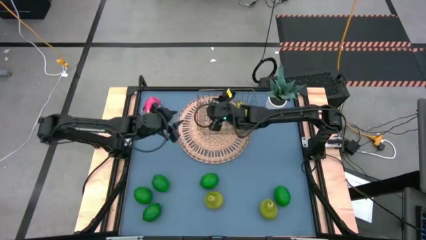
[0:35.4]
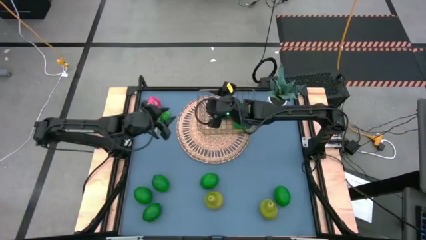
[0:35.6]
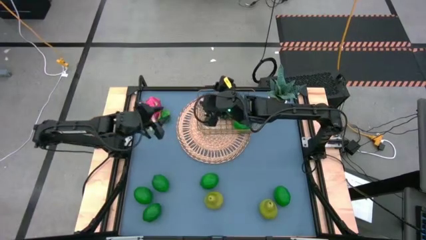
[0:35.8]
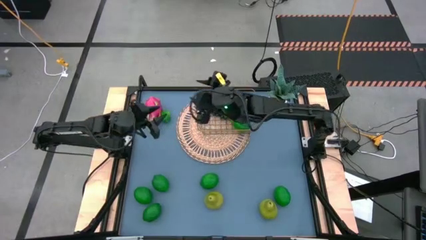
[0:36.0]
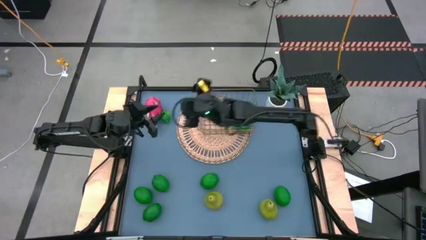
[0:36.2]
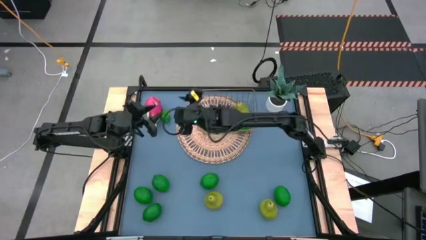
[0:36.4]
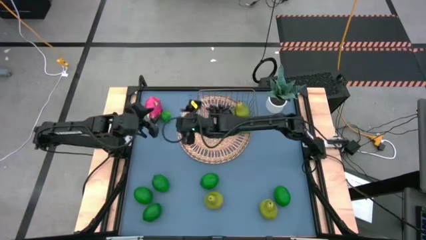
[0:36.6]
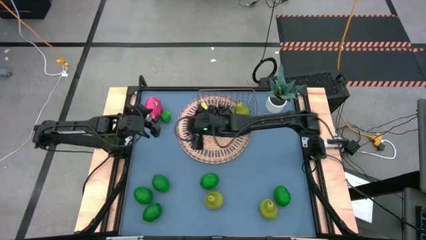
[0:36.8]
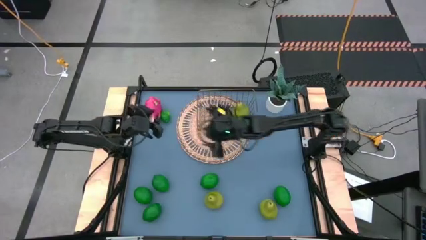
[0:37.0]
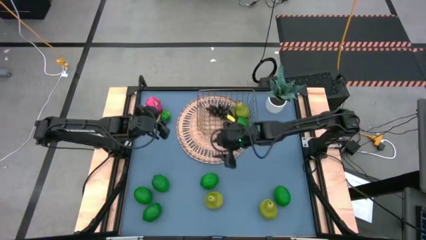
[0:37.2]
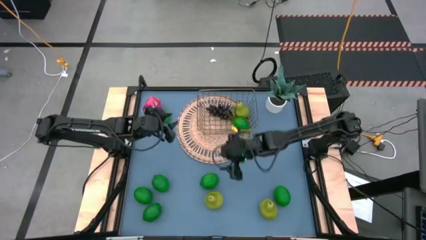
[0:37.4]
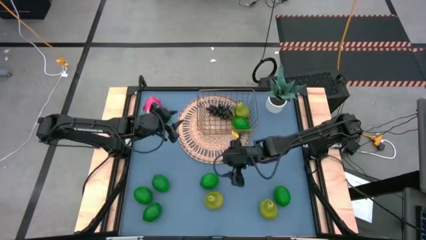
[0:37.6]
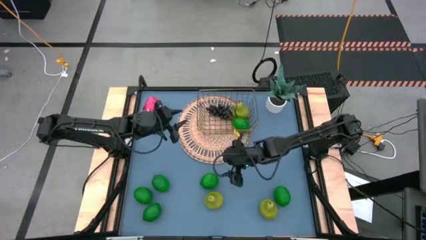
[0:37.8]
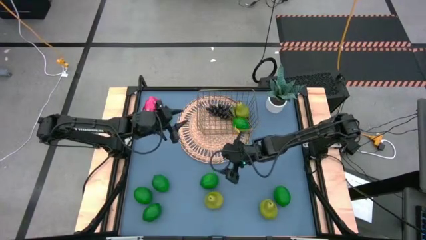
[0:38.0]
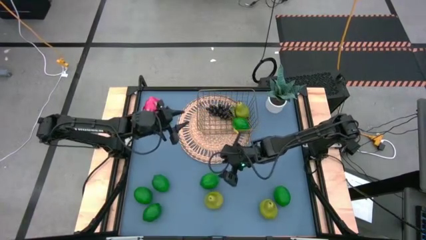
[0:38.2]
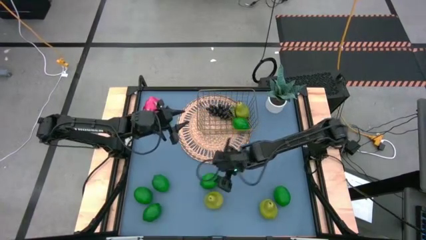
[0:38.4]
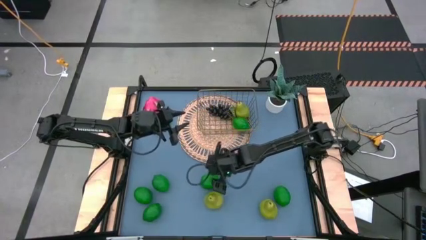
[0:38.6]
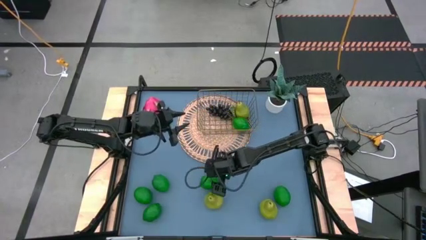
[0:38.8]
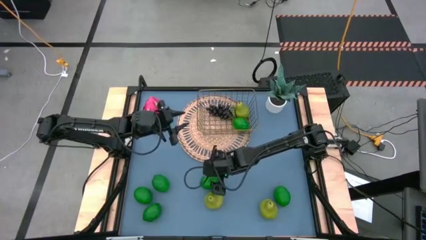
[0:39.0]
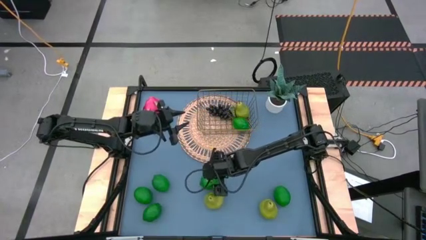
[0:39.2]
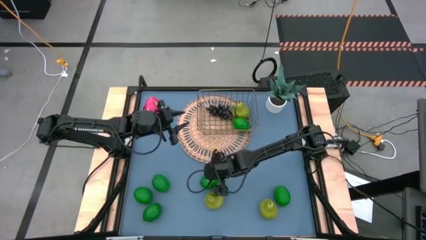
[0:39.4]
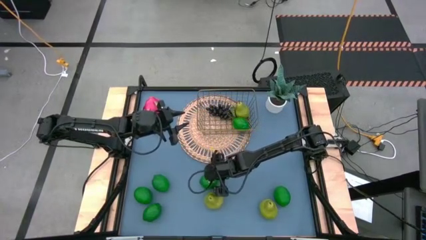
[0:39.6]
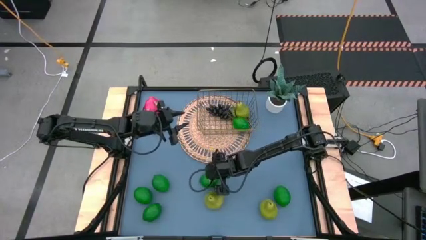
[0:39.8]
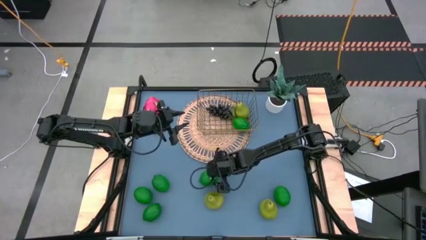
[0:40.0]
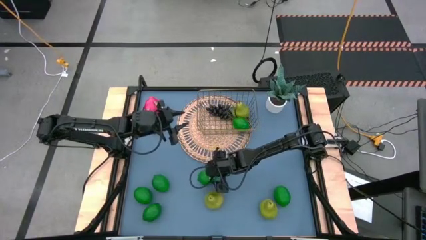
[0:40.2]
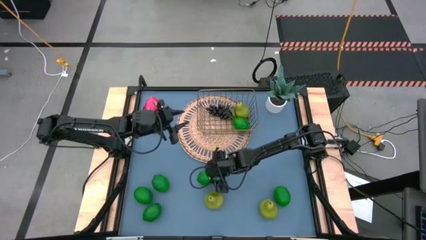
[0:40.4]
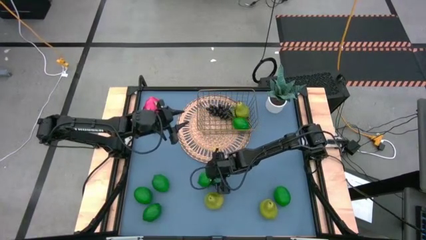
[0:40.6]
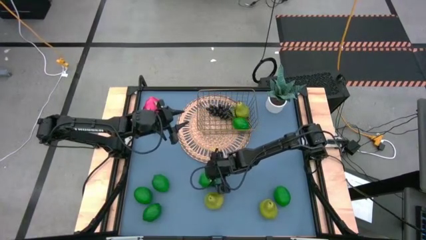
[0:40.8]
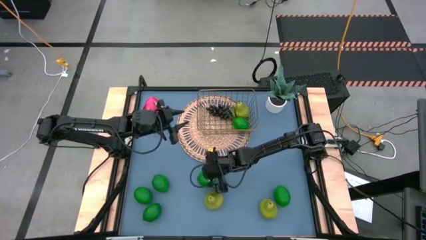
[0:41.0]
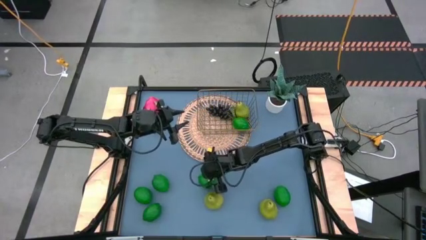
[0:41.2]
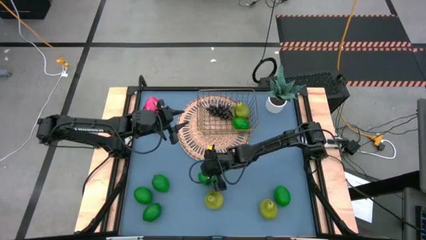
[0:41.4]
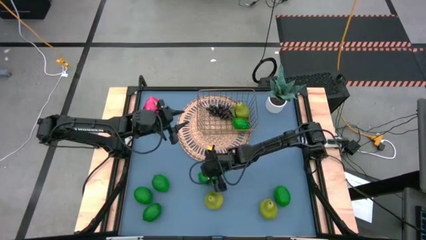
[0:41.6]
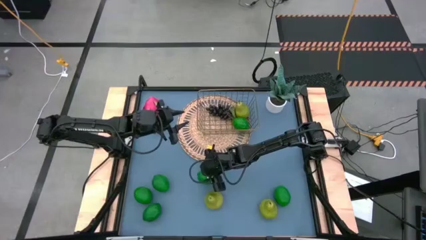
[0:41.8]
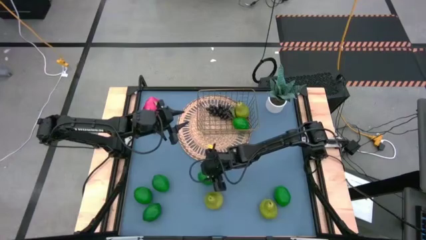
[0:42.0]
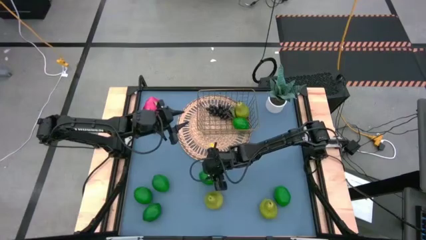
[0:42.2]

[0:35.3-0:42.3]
Task: Build produce basket
Put the green lime into the wire basket

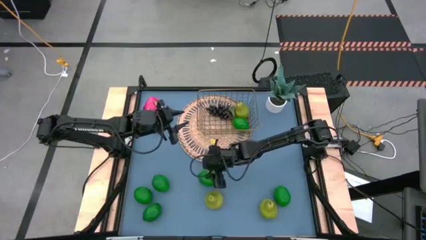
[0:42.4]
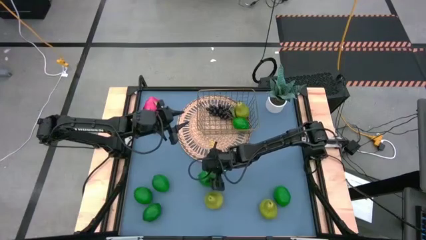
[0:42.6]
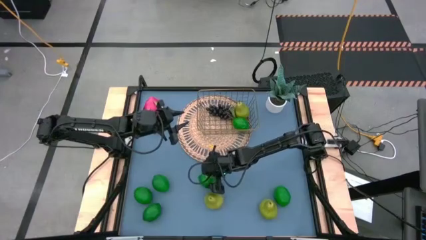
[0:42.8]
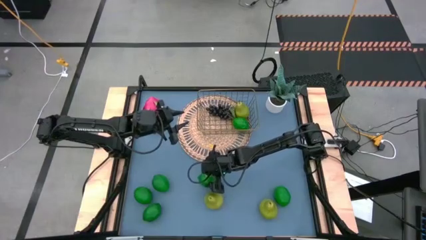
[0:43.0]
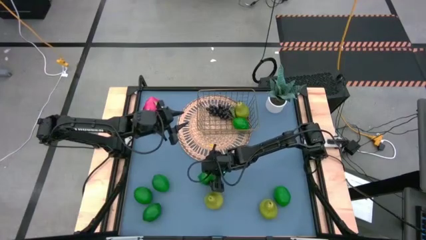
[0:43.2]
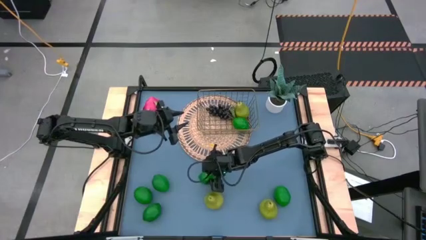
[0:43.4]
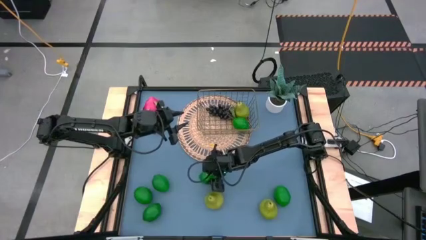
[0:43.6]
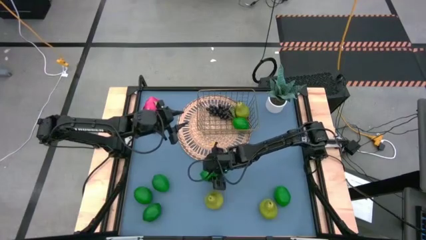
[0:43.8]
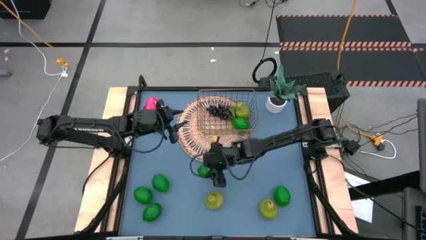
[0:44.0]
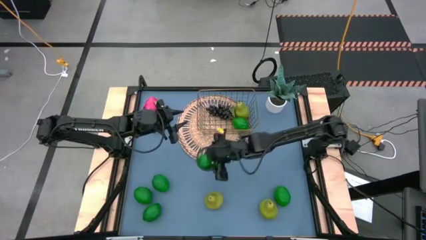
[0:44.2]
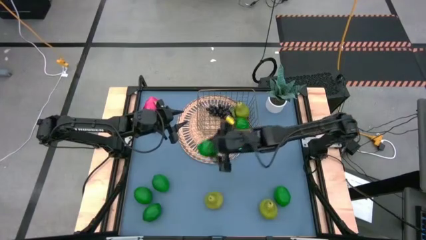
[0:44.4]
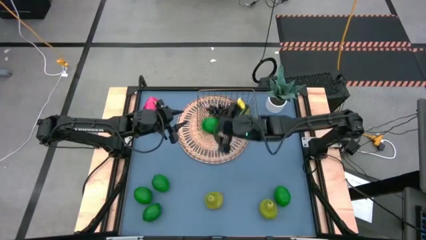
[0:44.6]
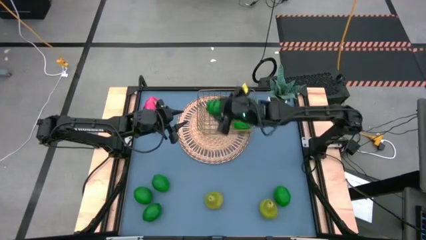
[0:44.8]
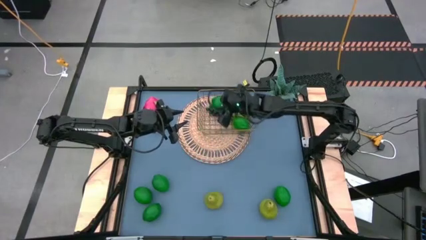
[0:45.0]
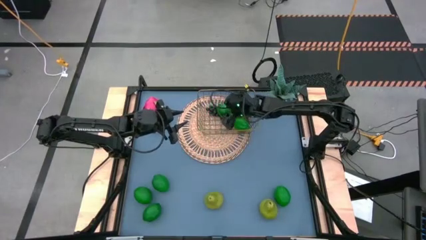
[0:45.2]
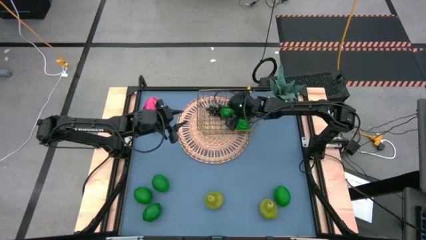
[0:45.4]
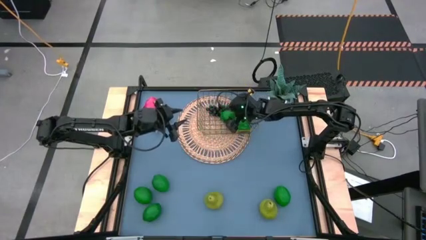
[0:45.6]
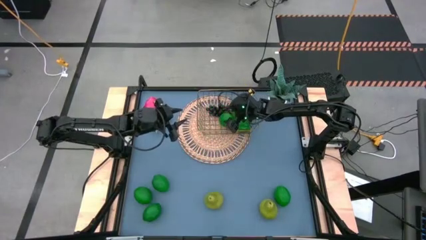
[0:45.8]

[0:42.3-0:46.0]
Put the green lime into the wire basket

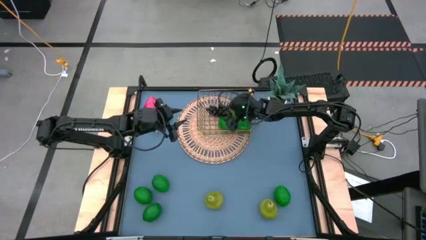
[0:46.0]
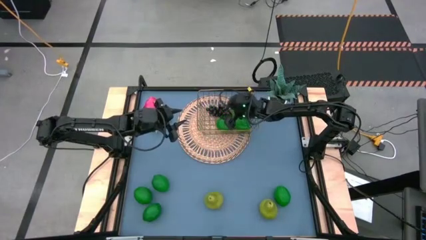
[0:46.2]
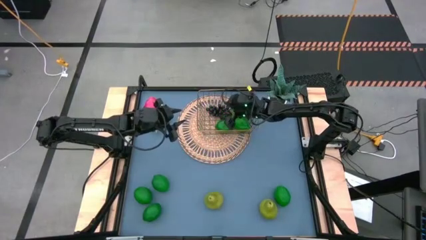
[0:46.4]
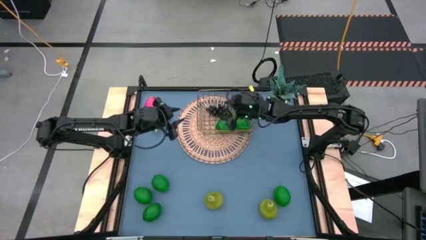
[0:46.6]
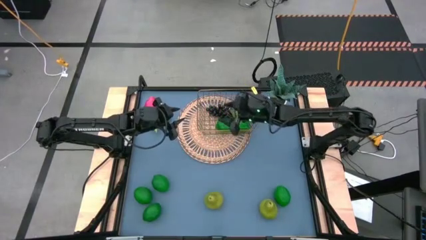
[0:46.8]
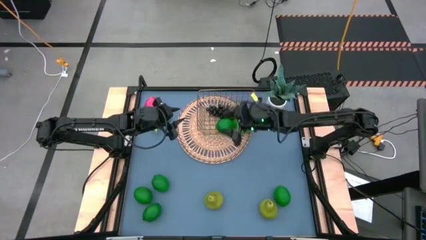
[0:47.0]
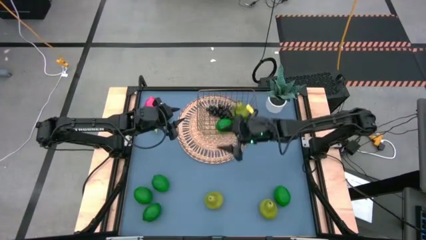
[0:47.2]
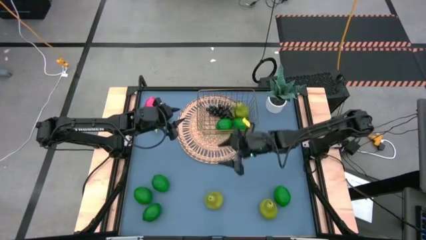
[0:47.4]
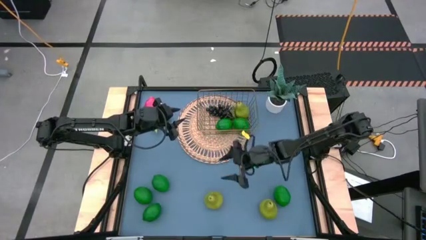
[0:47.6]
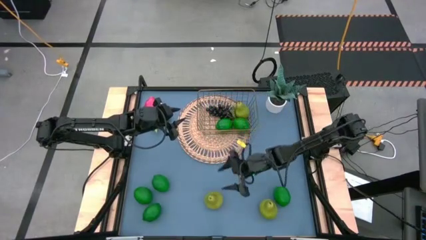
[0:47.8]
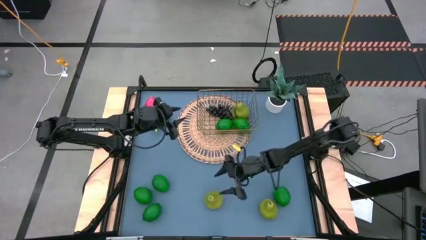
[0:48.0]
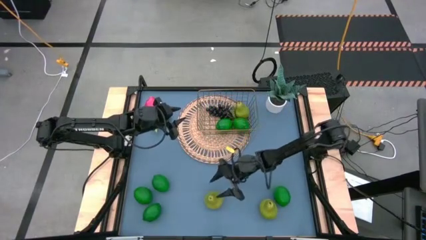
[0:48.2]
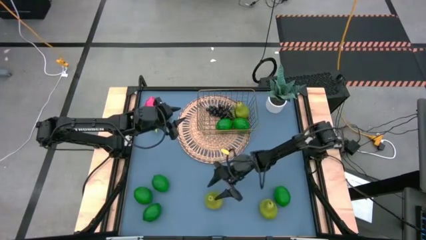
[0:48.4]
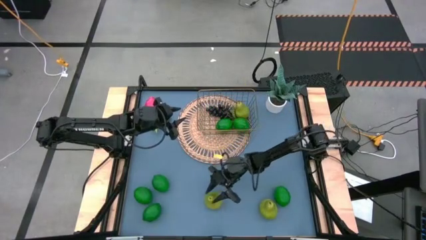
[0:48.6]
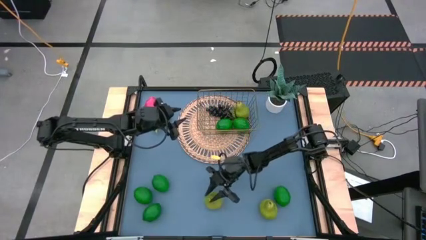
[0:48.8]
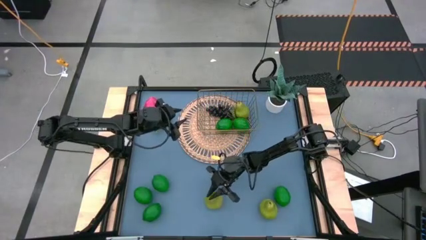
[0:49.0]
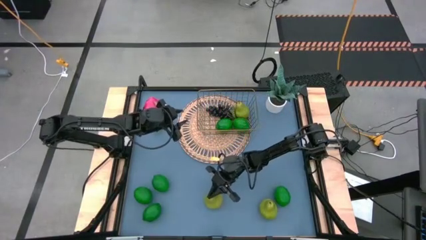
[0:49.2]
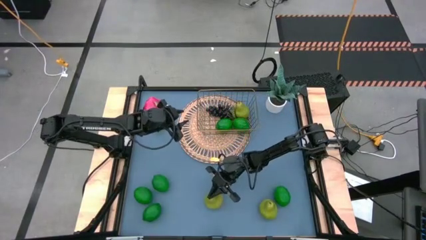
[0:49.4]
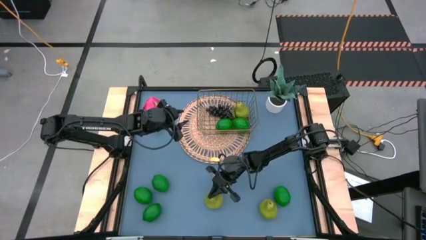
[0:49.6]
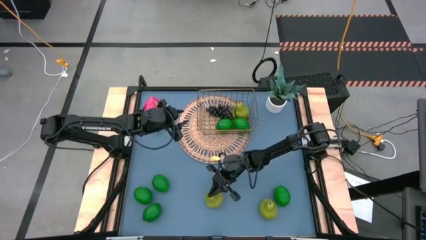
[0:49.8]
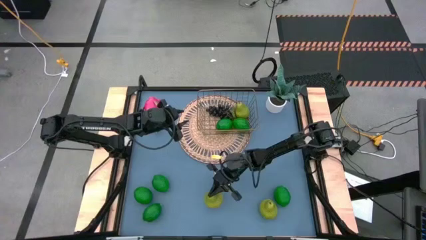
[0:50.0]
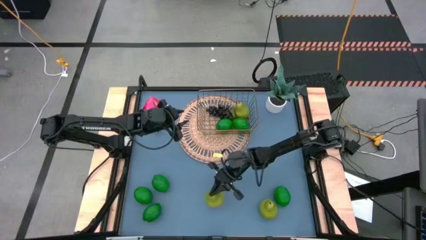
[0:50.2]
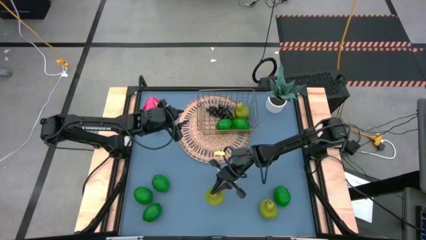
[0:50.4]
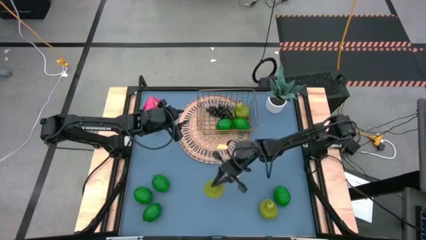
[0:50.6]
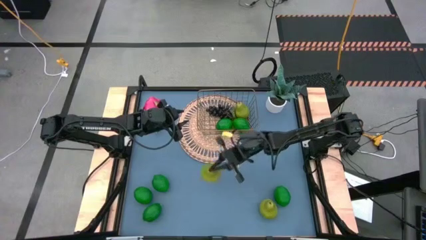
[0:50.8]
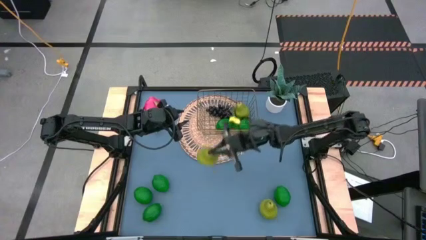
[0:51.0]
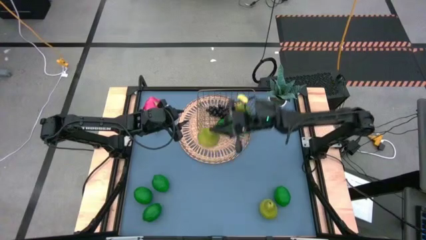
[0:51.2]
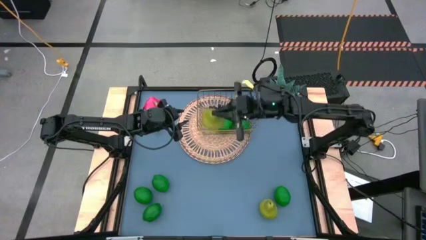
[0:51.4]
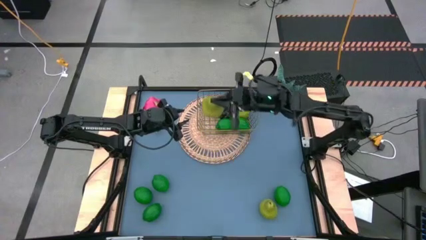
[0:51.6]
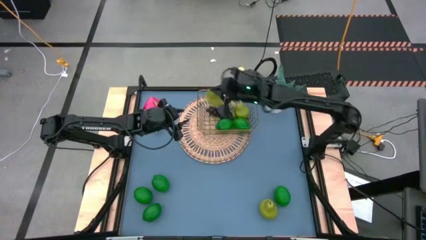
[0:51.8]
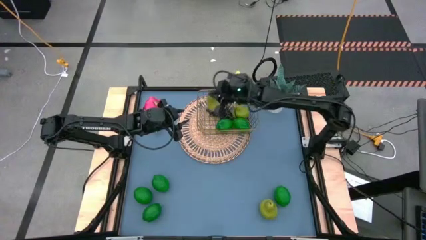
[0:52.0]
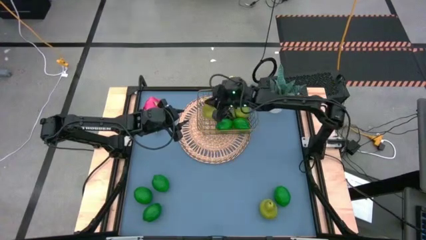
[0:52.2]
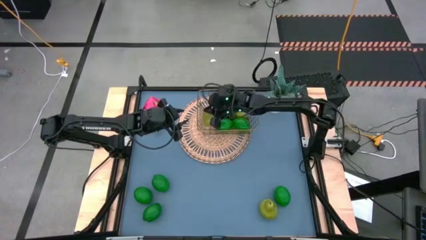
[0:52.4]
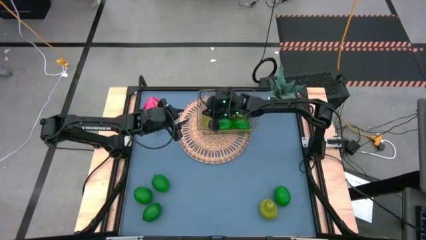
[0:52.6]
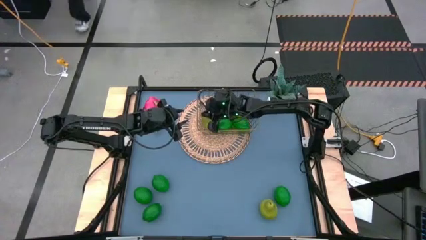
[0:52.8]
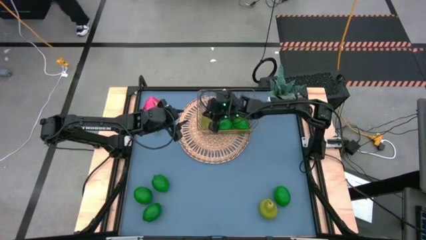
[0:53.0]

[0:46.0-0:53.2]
Put the green pear into the wire basket
